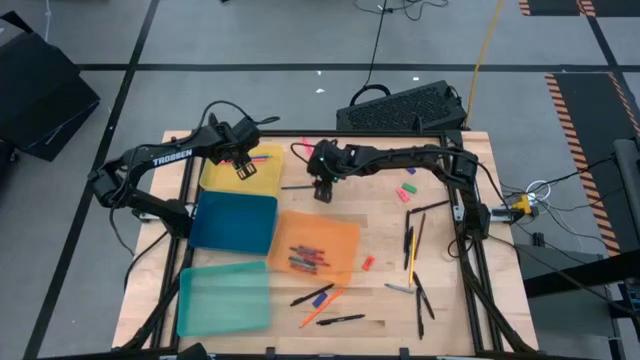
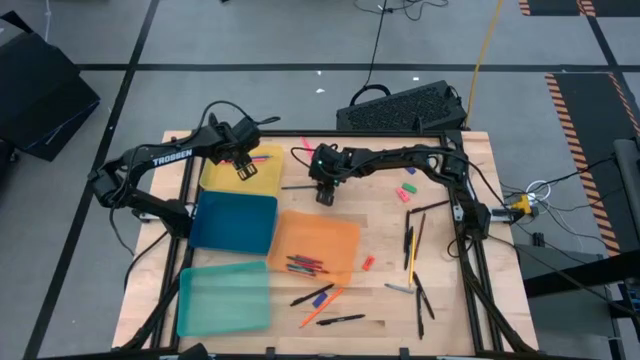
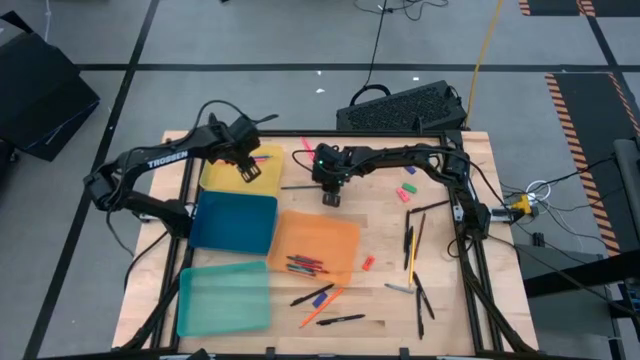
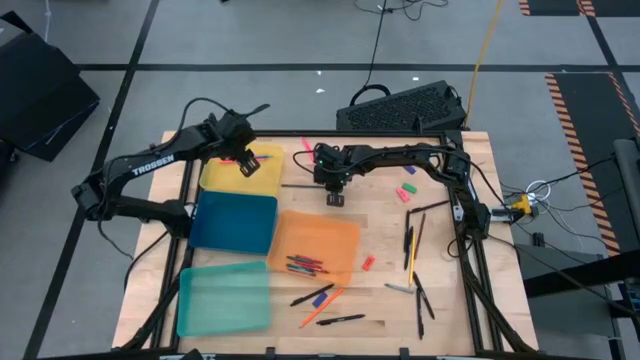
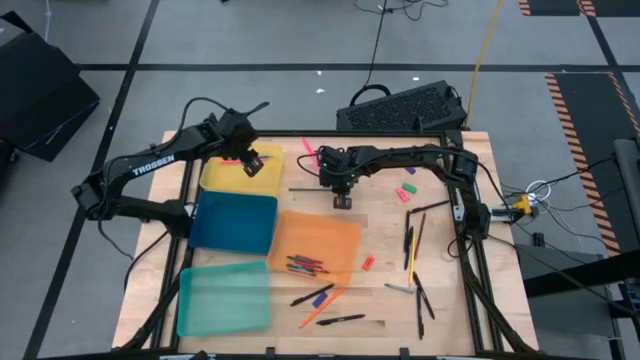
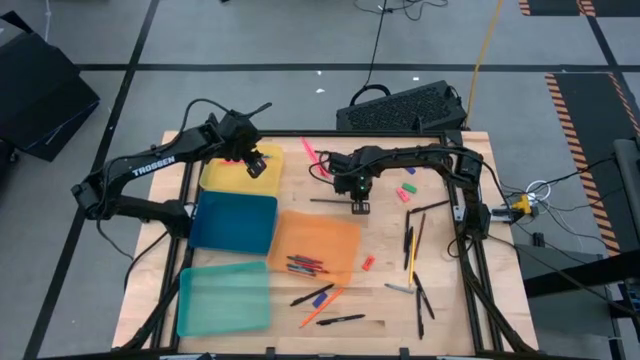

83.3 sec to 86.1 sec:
Task: Sort crayons/erasers/pens/pencils in bins
Put the green pencil into yellow bin

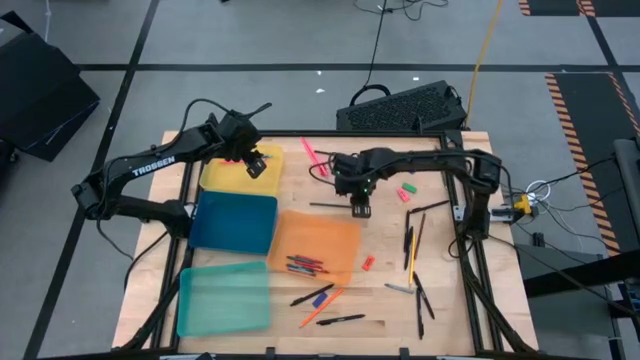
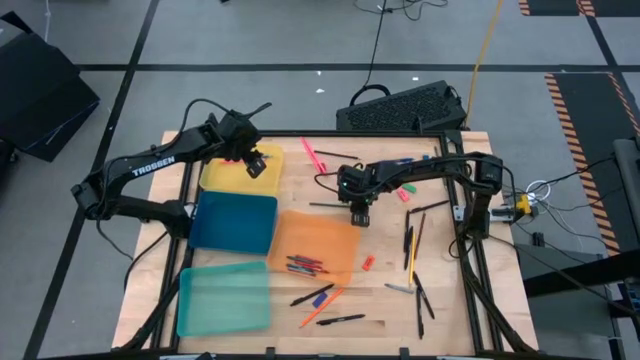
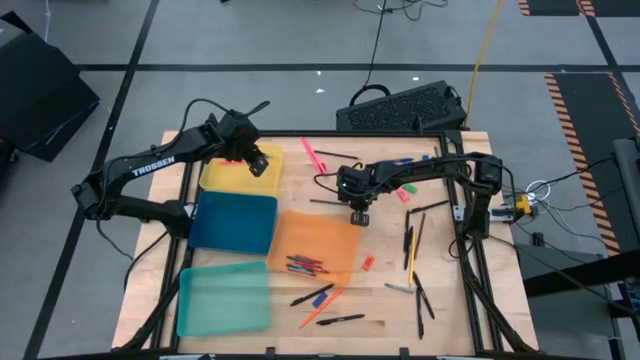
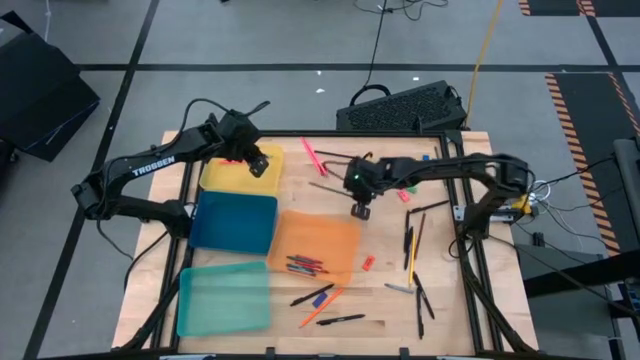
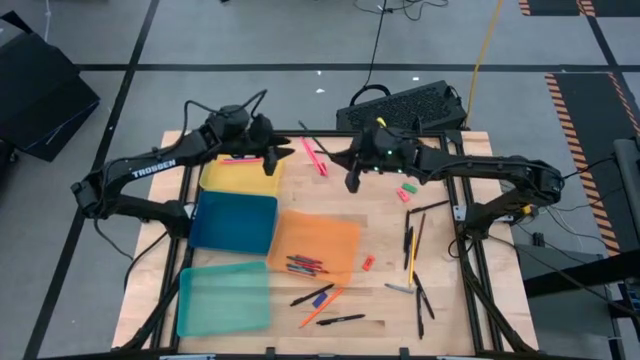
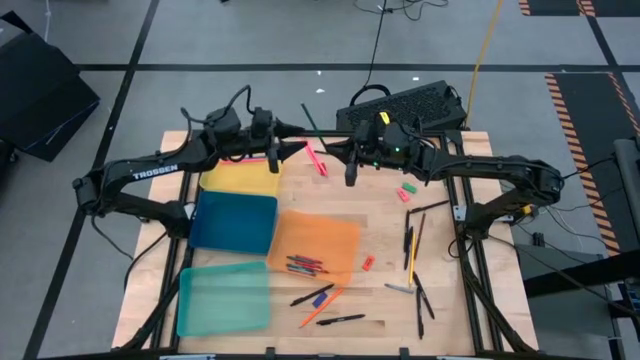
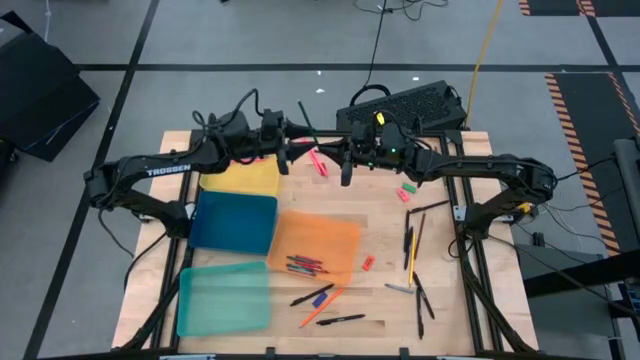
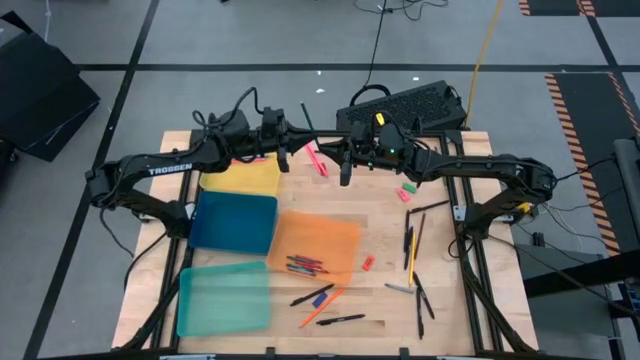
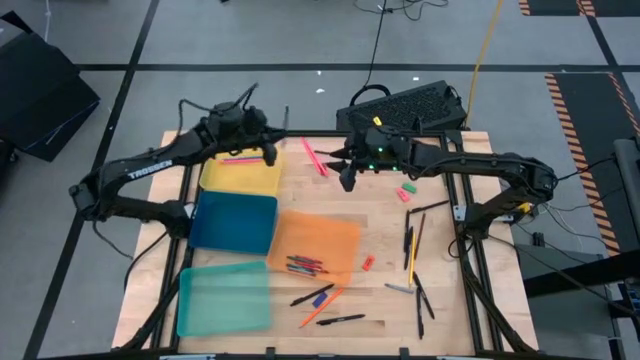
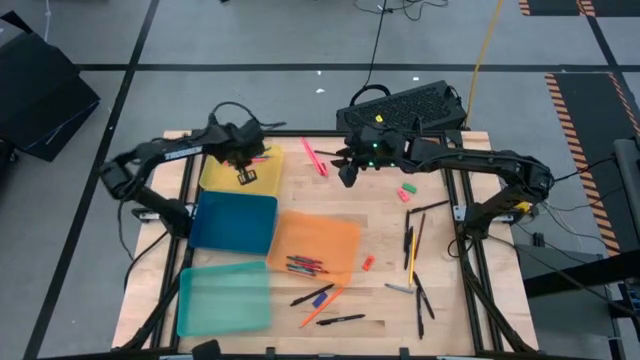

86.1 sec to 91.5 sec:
Put the green pencil into yellow bin

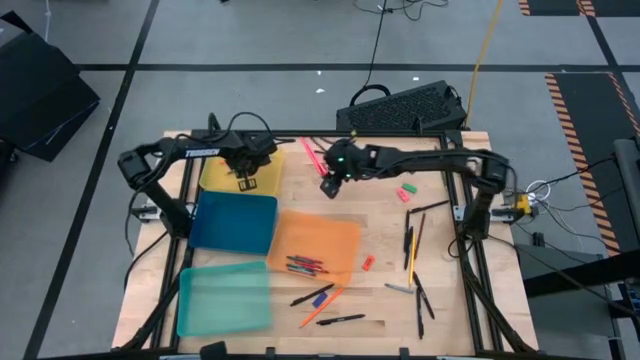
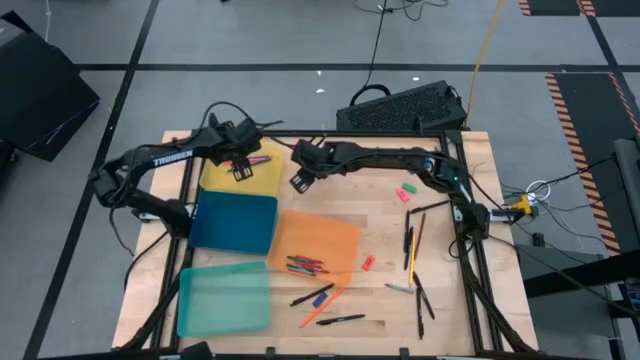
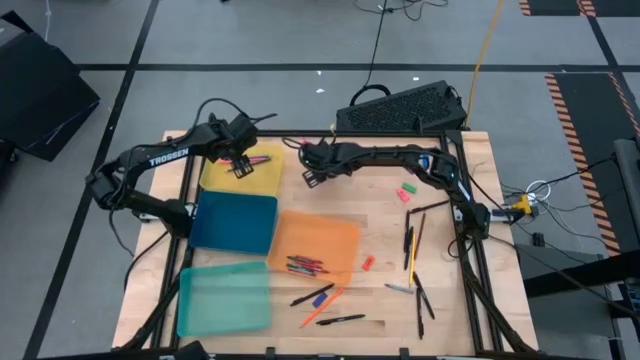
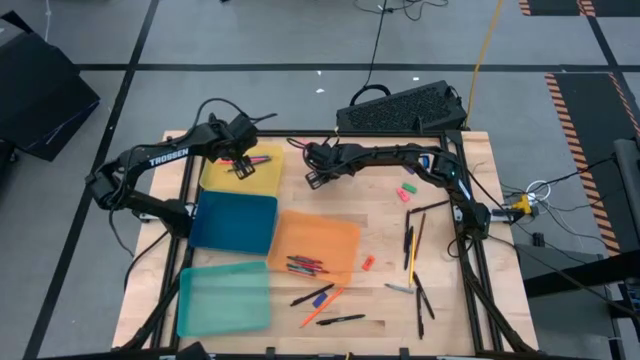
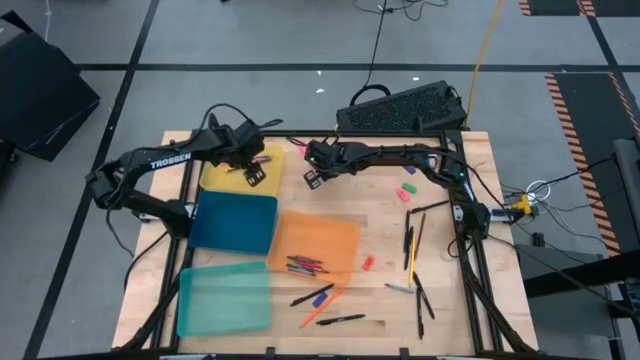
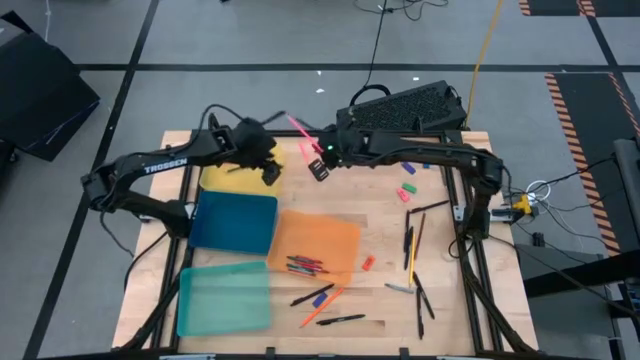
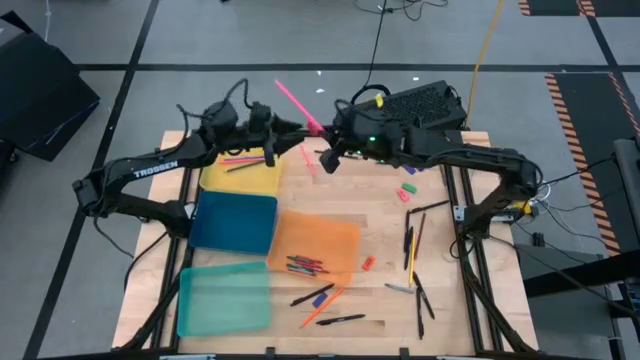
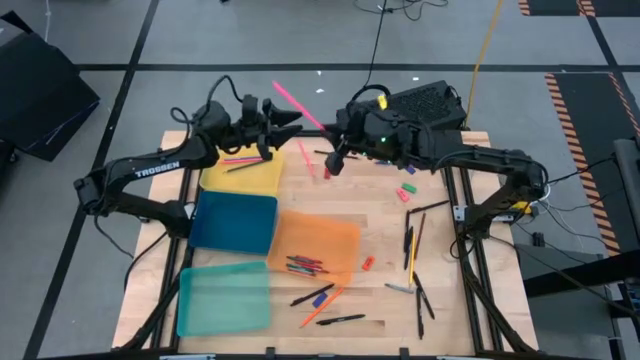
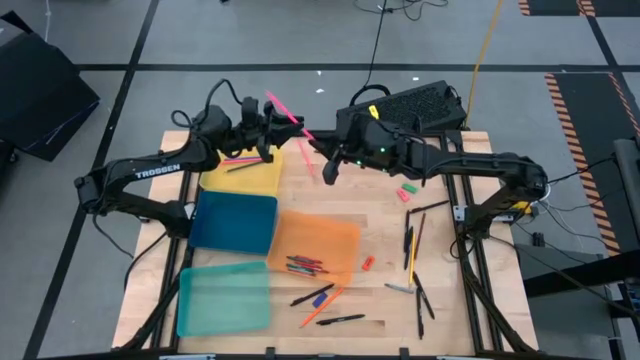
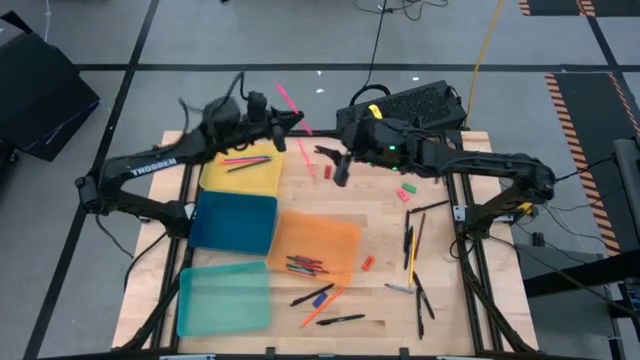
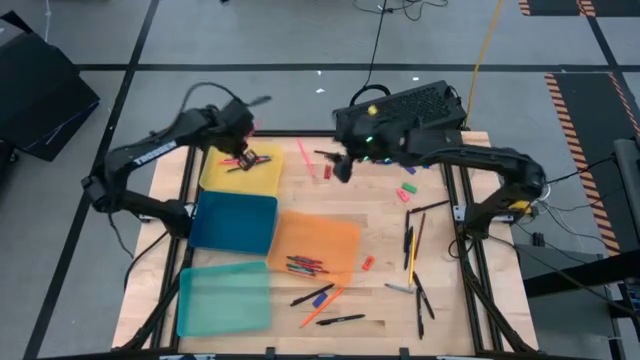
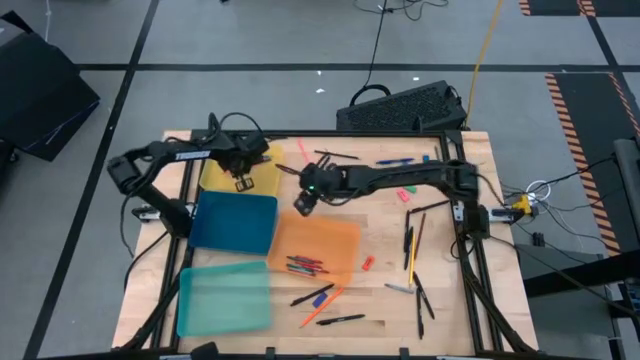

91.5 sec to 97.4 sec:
Put the pink pencil into yellow bin

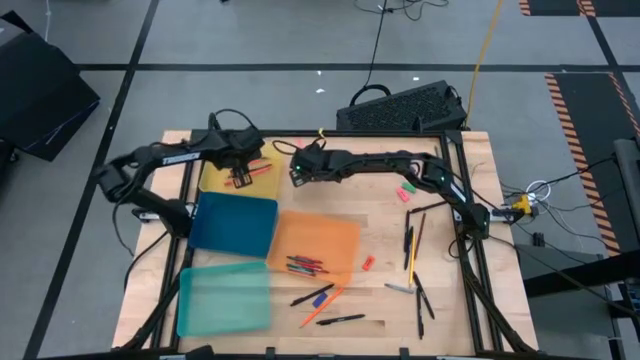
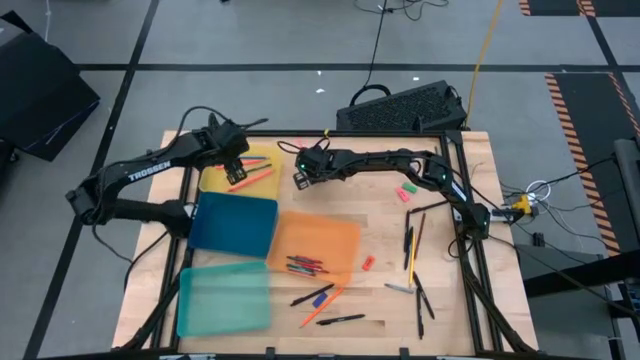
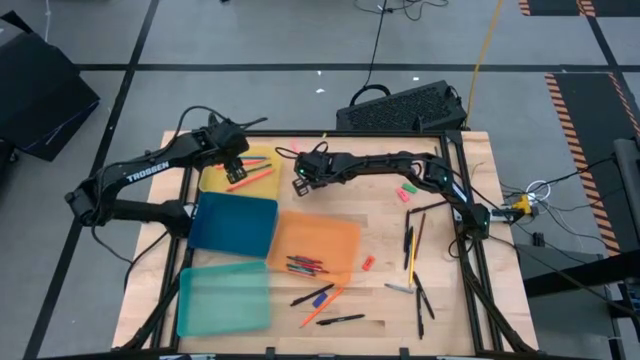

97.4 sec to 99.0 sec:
Put the pink pencil into yellow bin

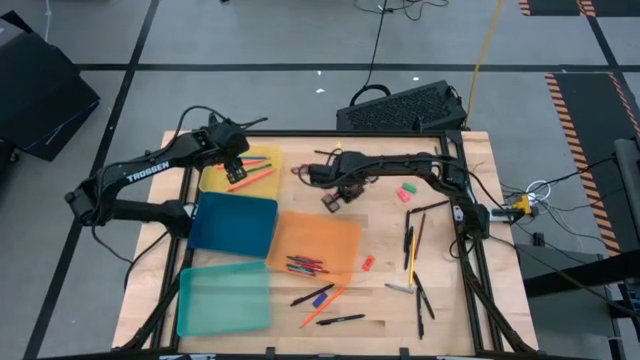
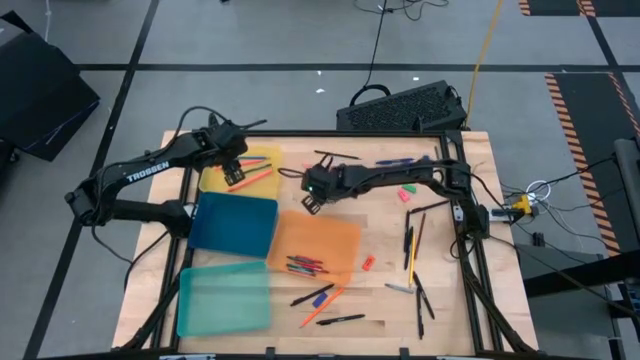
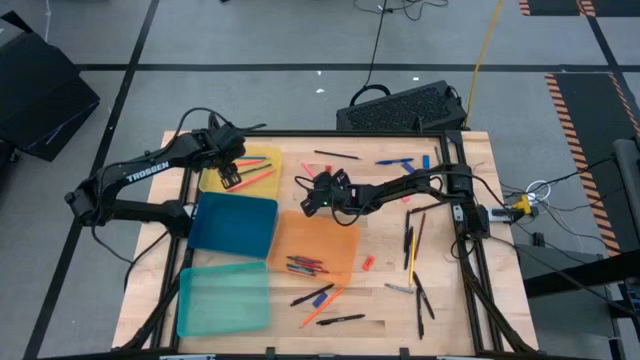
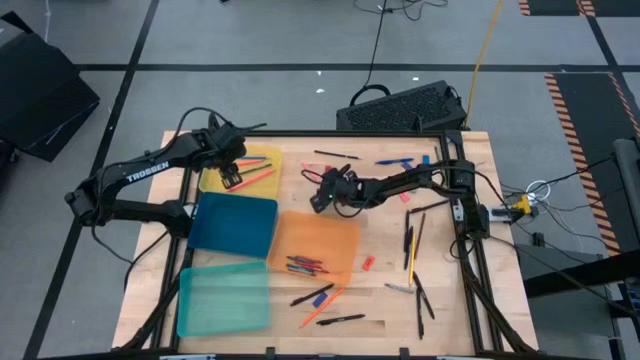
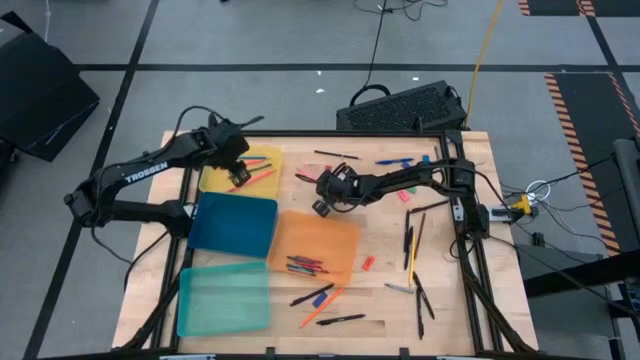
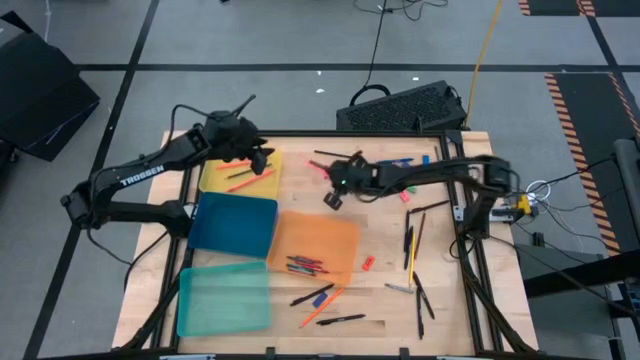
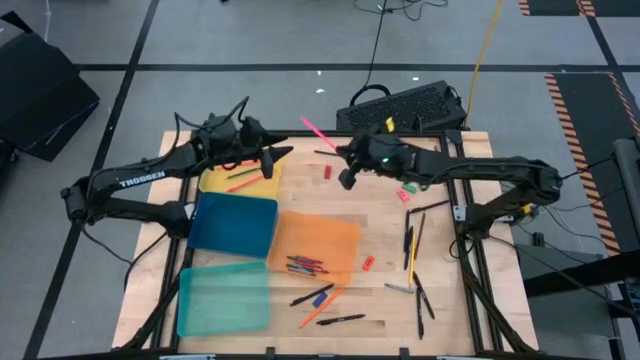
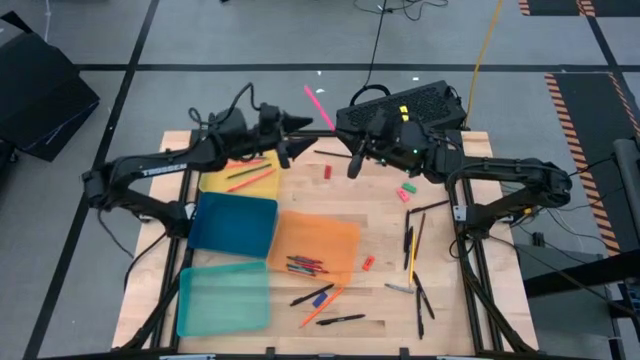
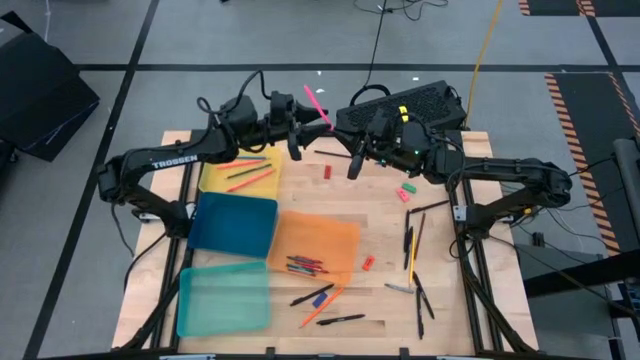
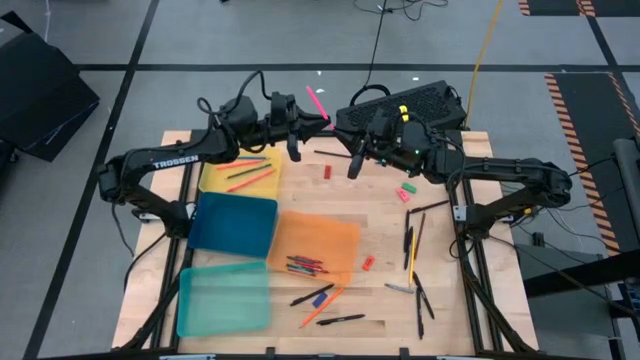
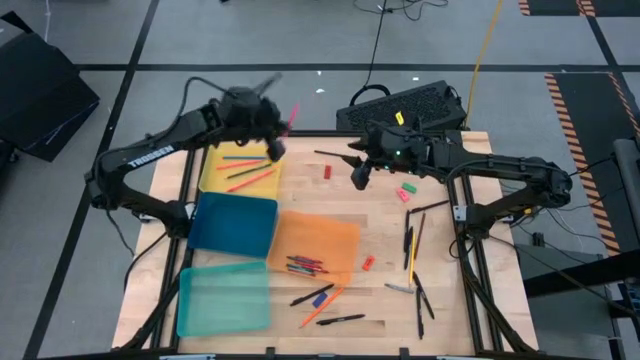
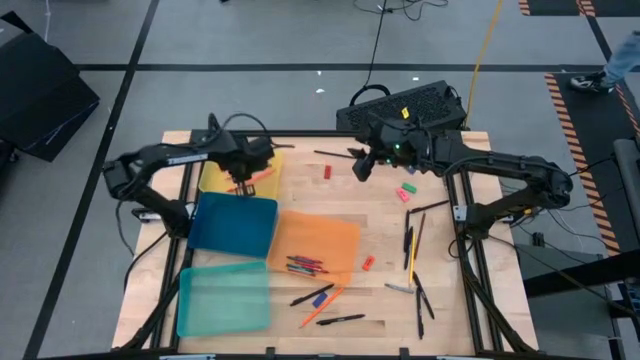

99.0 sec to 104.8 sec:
Put the pink pencil into yellow bin
